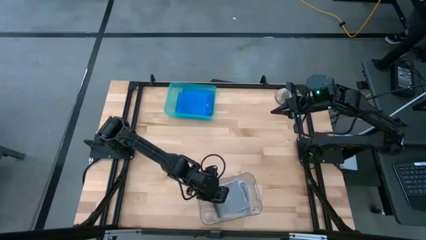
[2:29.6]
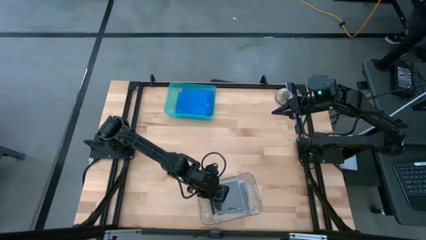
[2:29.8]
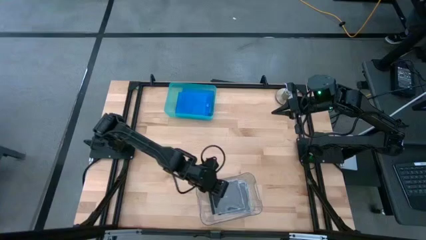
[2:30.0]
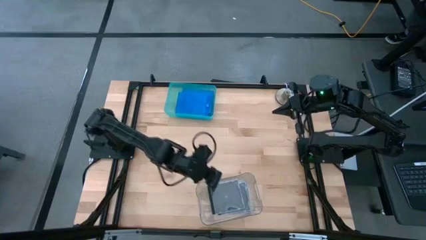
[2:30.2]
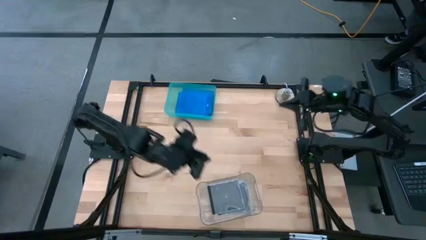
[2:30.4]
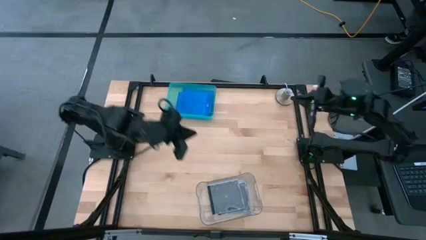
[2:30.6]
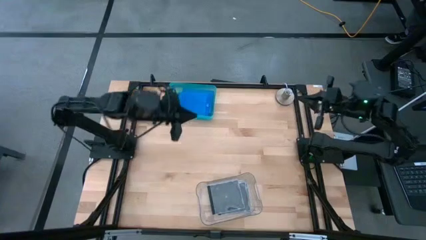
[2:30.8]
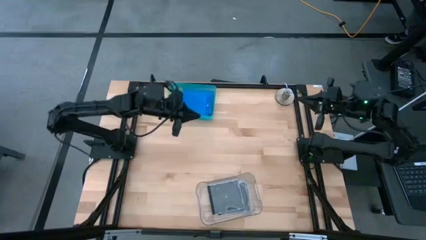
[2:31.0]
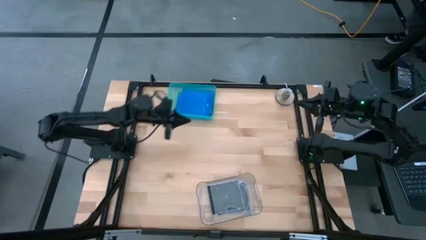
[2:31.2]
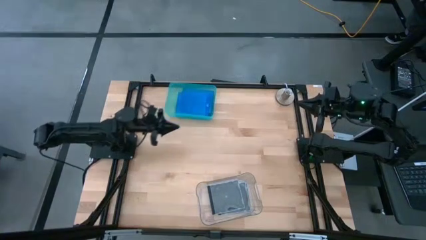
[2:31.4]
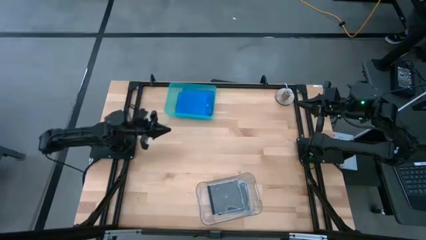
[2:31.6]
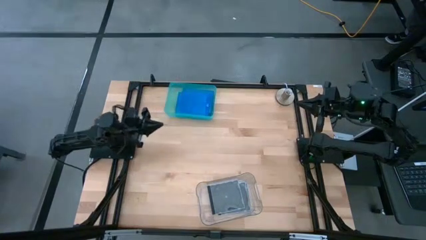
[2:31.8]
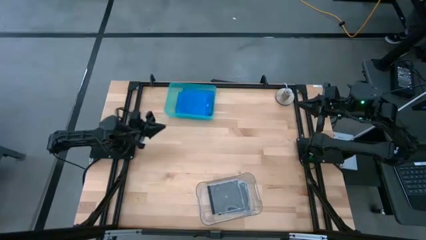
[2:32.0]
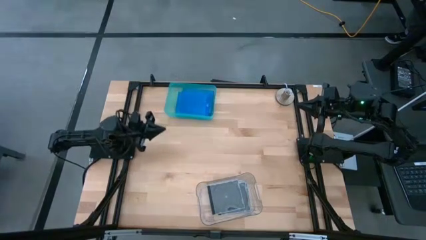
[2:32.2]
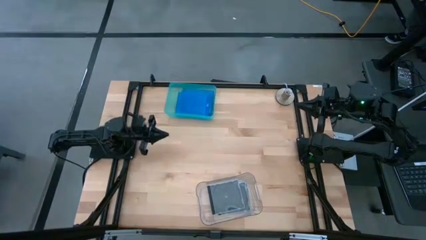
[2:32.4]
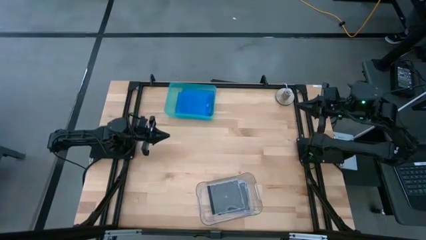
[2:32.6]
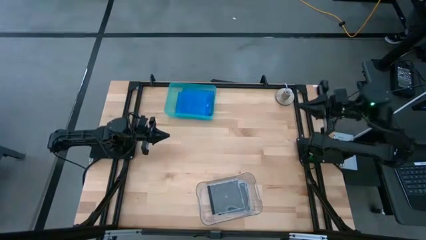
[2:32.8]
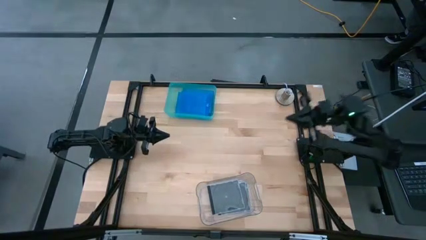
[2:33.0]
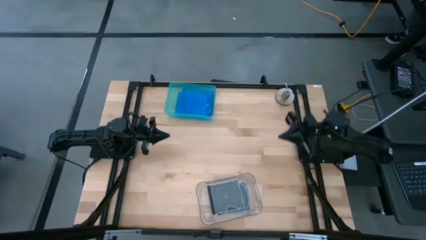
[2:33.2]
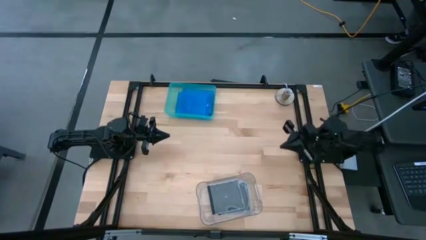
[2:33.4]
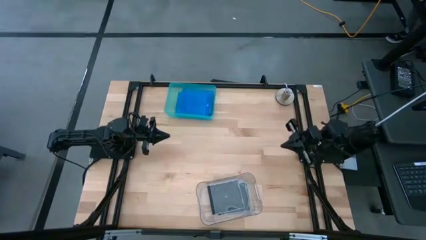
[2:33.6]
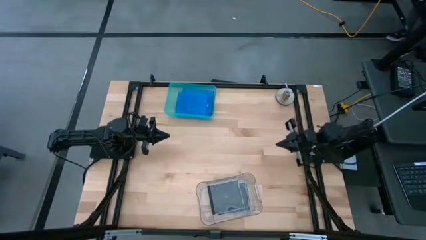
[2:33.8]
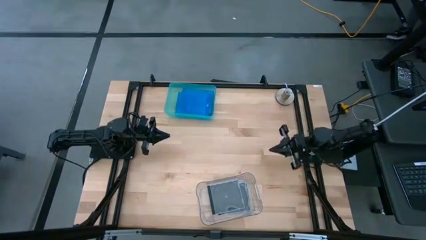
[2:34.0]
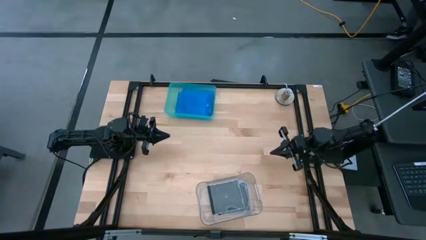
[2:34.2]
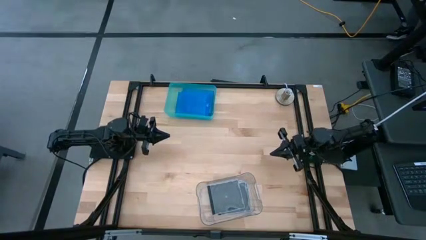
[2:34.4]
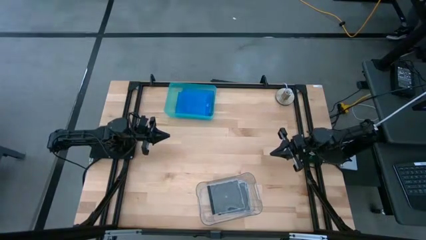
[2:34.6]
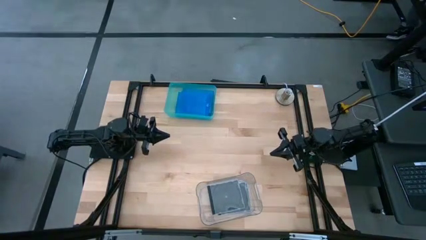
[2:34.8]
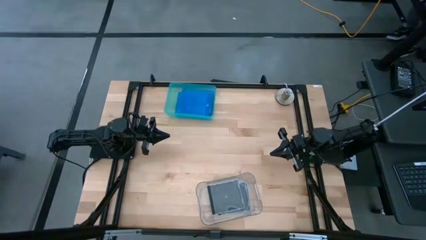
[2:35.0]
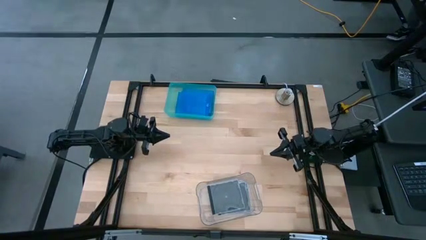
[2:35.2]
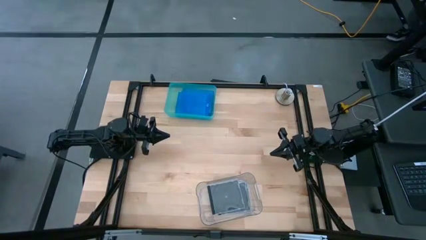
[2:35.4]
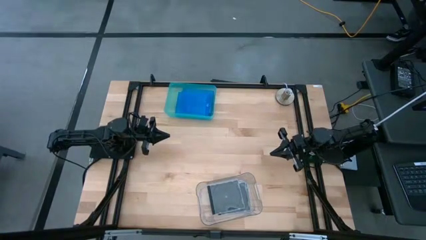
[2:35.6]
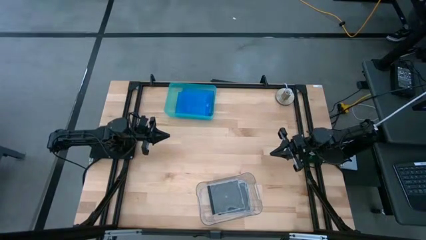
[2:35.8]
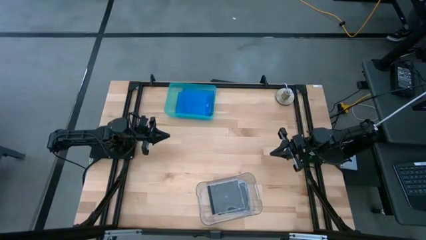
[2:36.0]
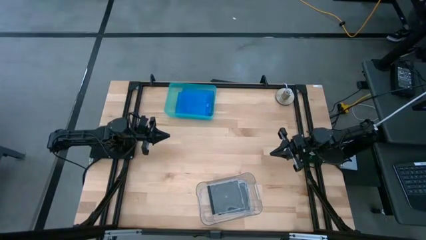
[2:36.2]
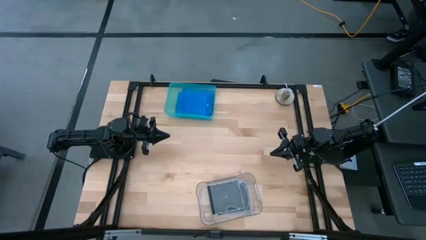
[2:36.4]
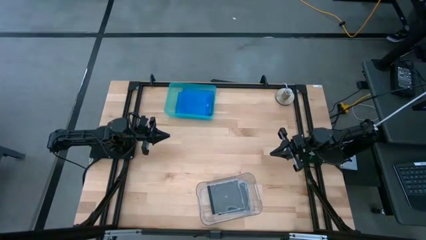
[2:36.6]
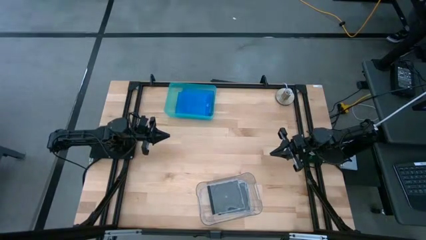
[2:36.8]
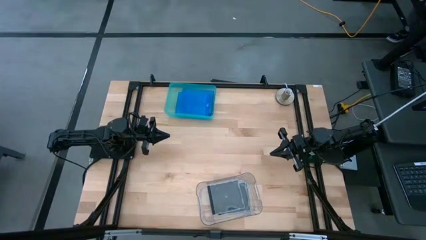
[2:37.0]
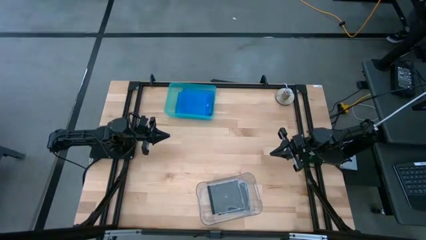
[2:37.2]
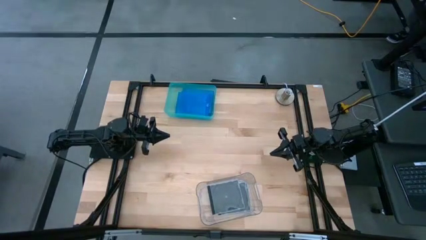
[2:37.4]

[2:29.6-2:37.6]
Task: Pick & place jewel cases by type
Return to Home Position

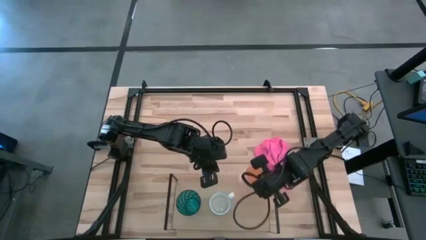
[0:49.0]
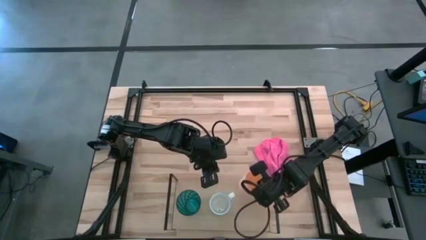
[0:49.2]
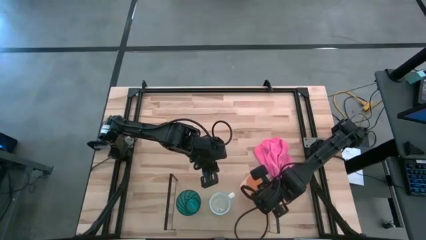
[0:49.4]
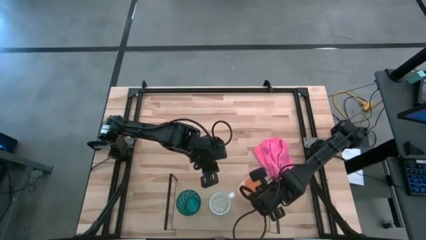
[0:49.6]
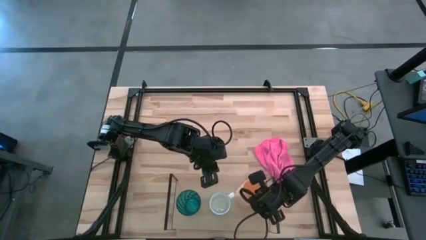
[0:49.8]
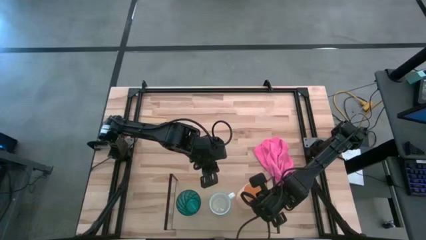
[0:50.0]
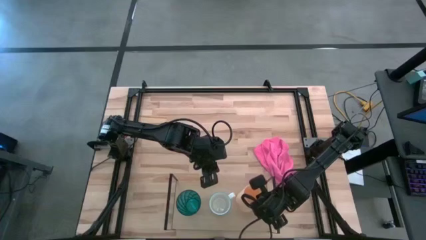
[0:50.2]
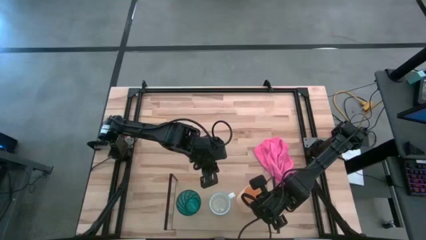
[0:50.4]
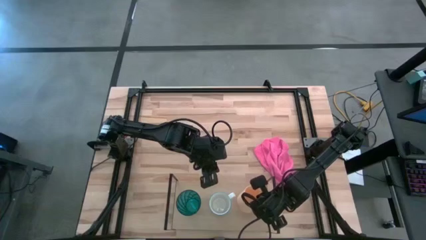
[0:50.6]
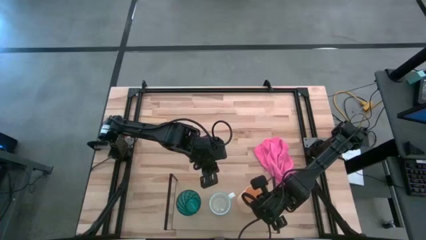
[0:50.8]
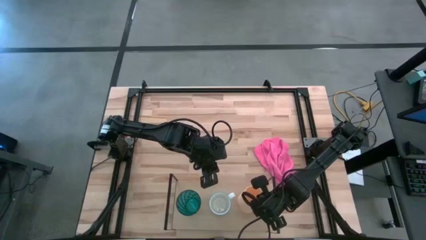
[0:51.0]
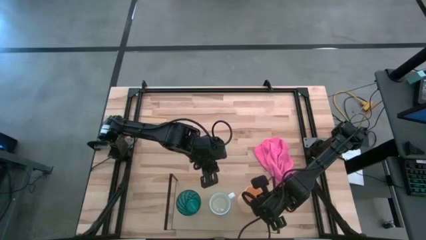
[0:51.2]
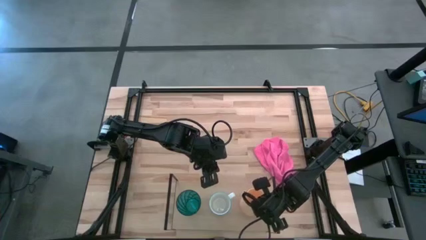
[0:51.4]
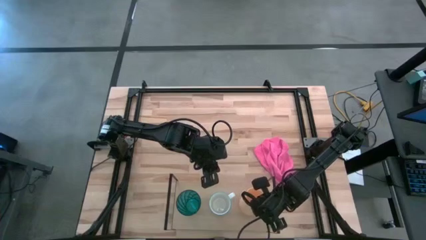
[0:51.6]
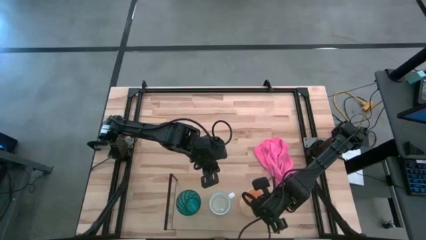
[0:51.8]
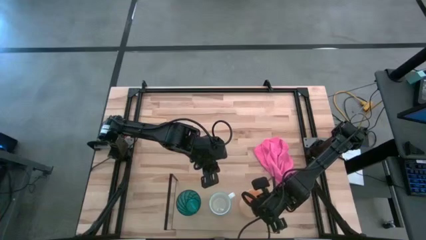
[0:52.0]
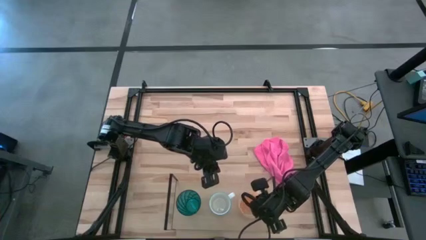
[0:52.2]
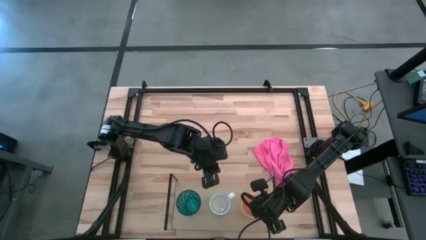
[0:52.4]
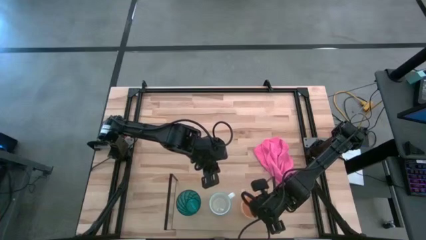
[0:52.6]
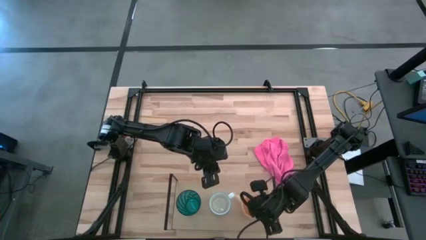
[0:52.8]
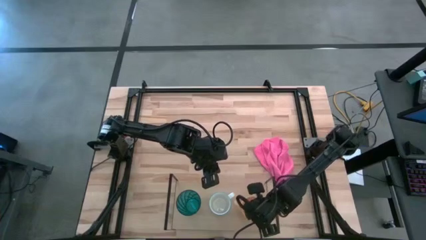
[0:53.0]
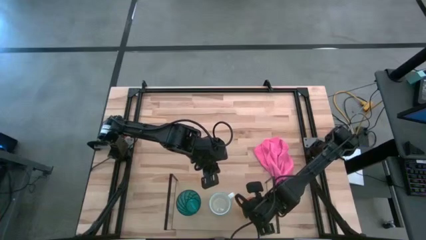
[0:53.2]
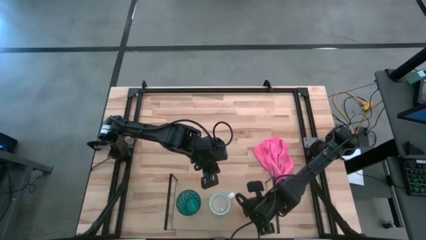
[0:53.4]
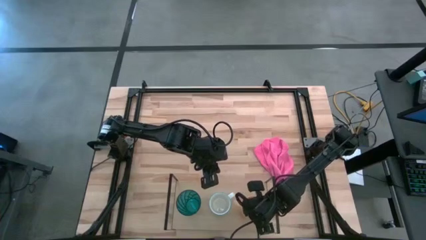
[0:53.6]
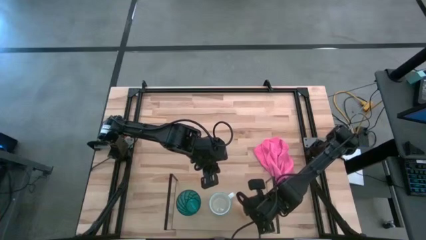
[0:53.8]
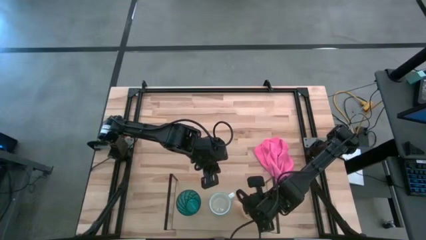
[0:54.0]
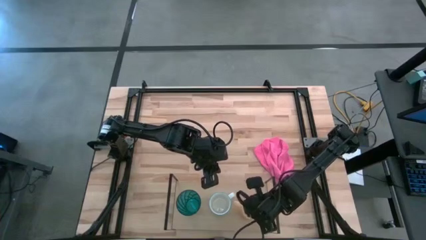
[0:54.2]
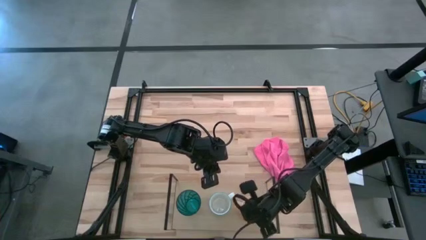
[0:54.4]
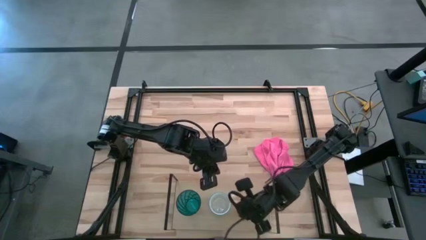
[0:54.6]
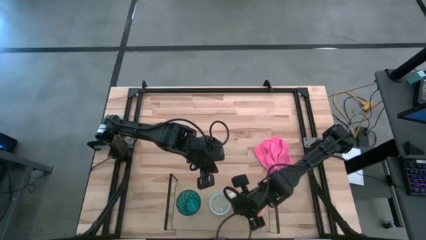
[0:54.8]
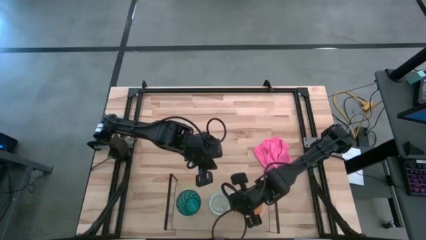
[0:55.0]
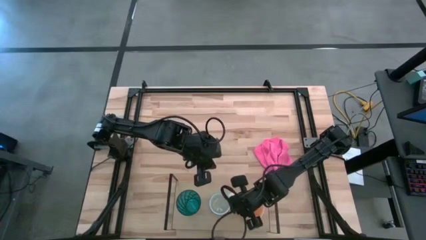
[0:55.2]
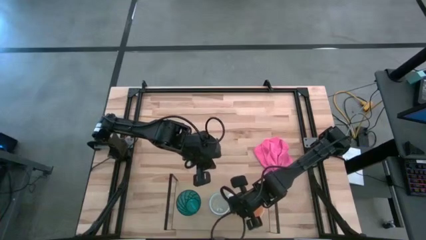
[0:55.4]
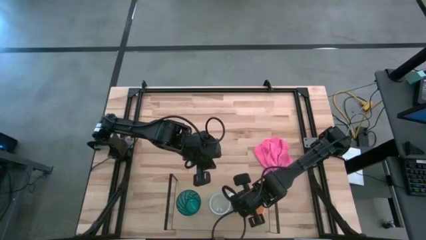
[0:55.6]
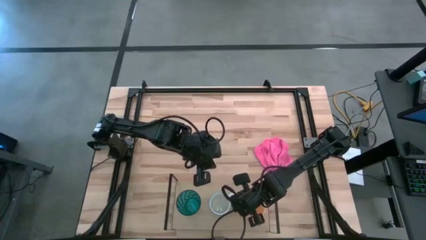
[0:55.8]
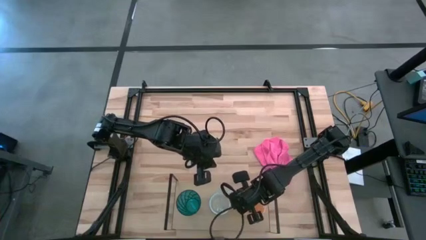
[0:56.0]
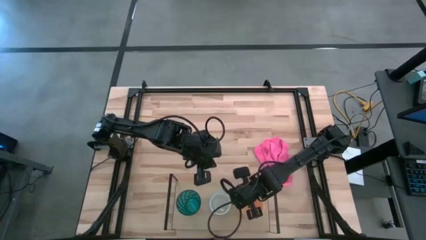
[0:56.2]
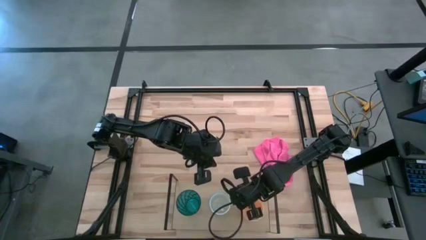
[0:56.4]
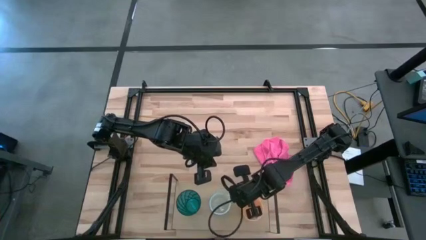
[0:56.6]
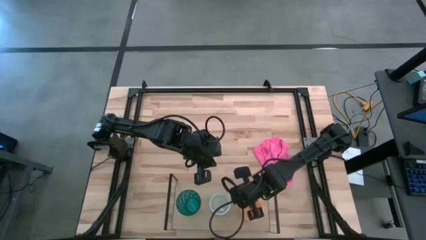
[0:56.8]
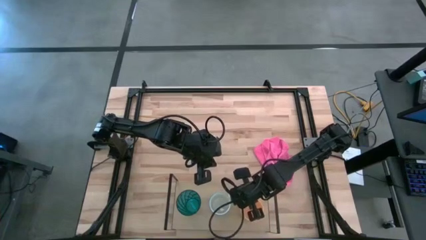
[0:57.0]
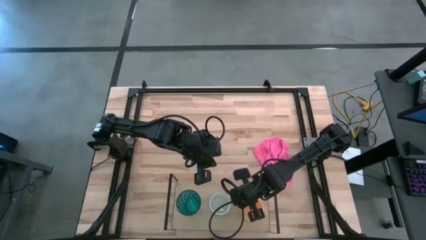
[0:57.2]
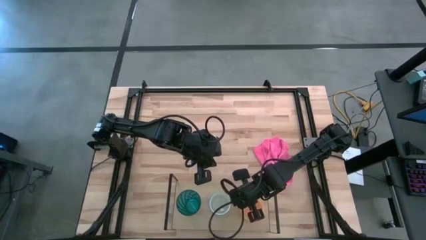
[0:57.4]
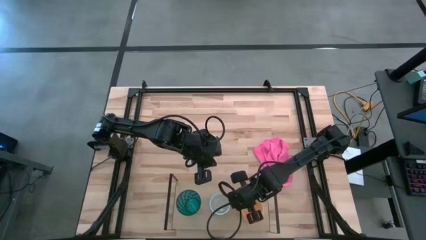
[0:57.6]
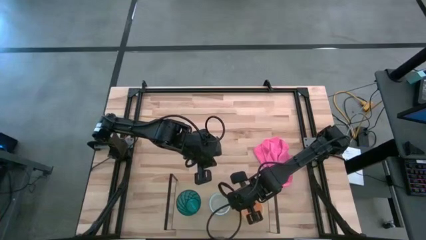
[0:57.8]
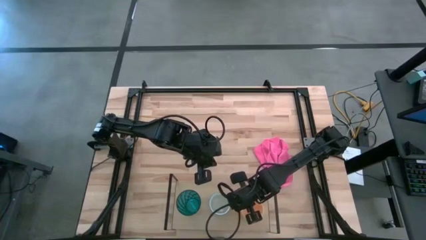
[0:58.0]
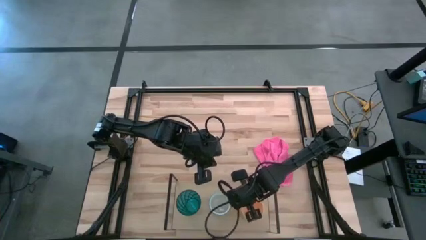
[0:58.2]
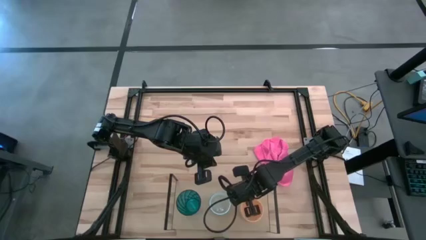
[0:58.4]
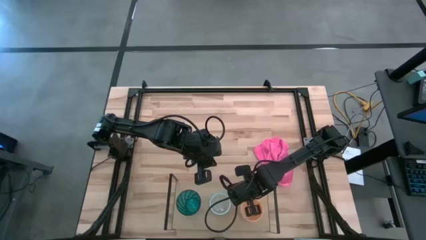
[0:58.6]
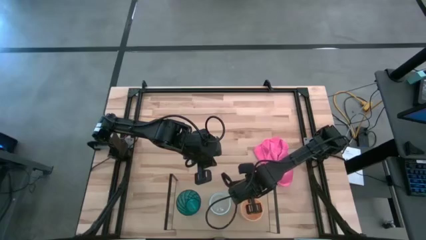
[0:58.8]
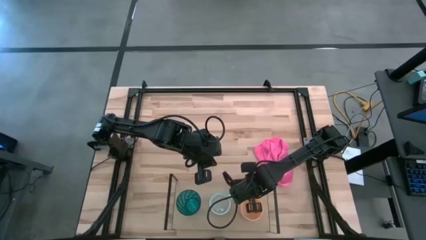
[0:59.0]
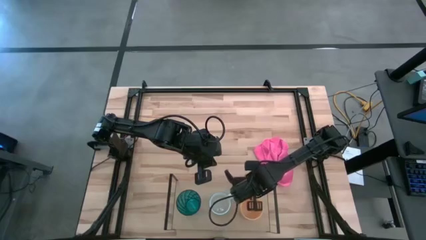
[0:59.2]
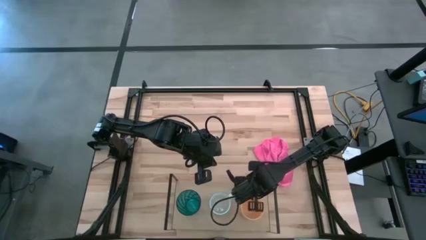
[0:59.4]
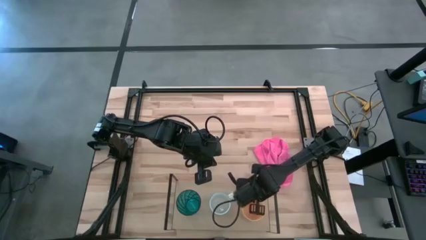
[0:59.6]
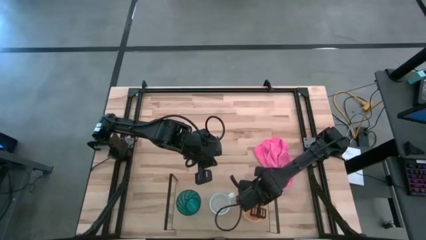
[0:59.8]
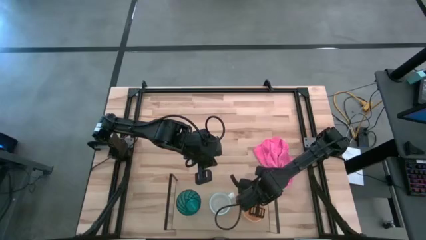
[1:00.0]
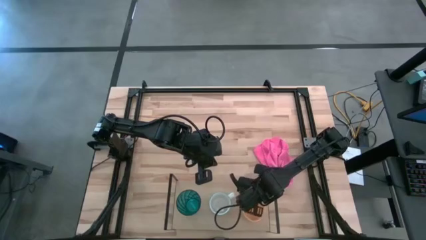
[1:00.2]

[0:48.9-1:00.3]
Task: Stack small to large cups/mugs on shelf
Put the orange mug on the shelf
